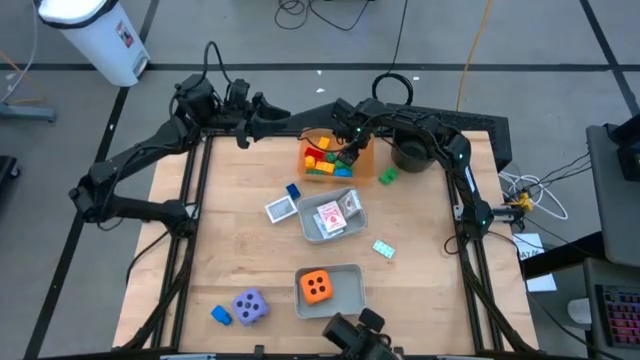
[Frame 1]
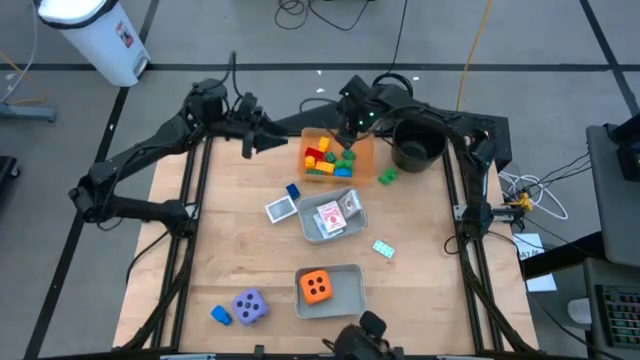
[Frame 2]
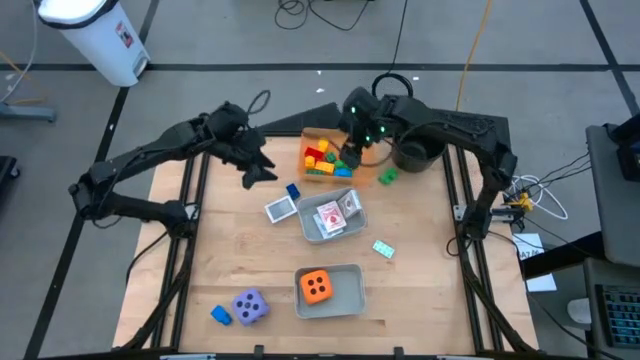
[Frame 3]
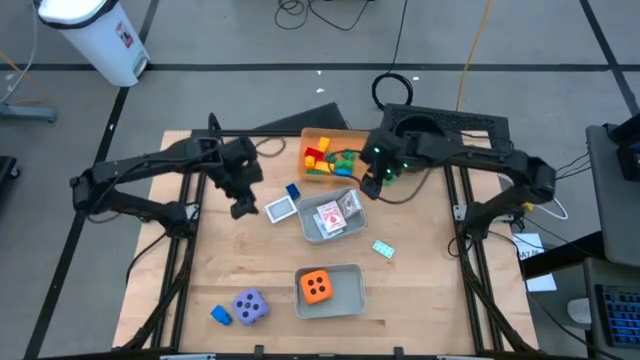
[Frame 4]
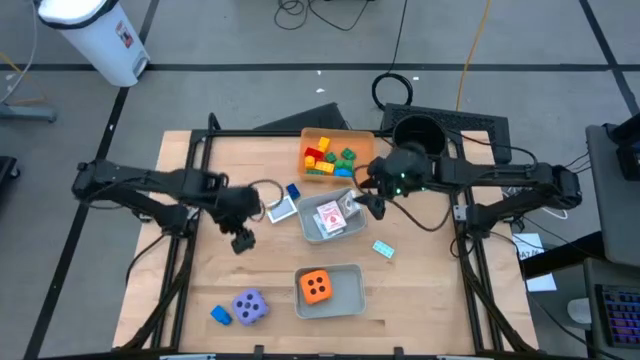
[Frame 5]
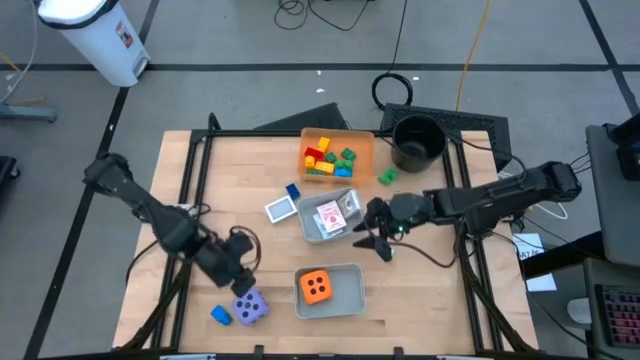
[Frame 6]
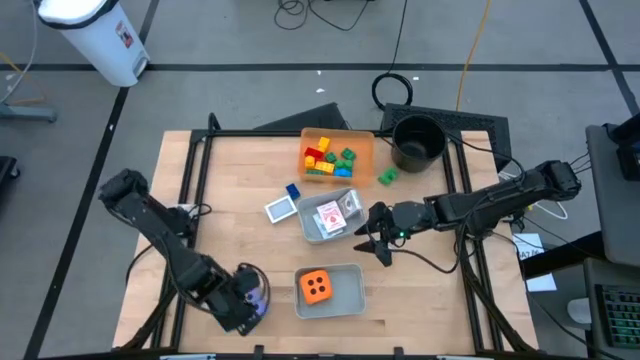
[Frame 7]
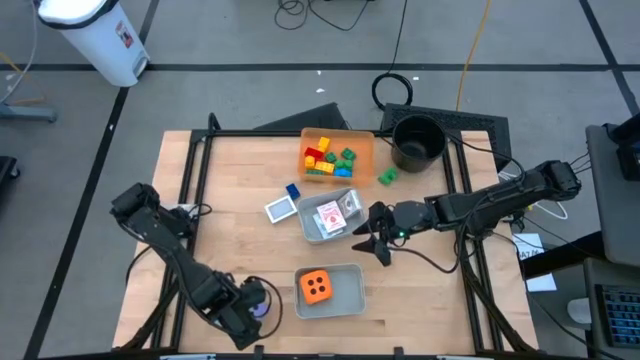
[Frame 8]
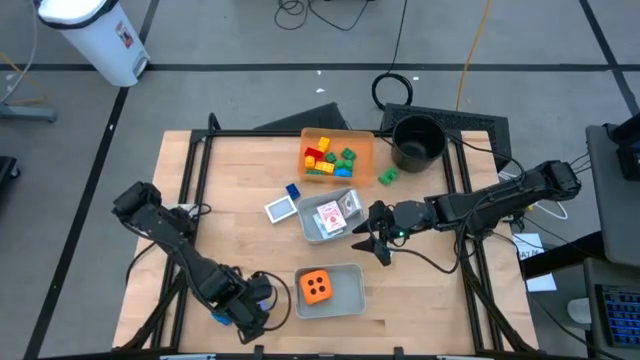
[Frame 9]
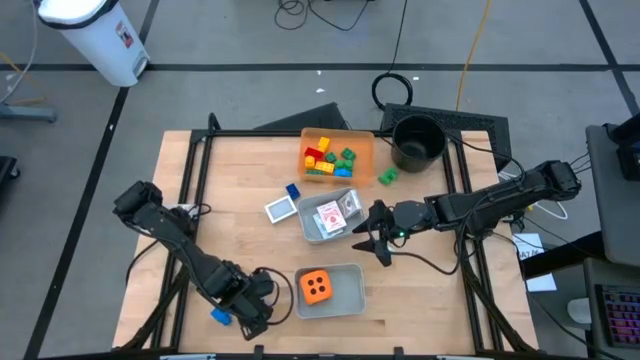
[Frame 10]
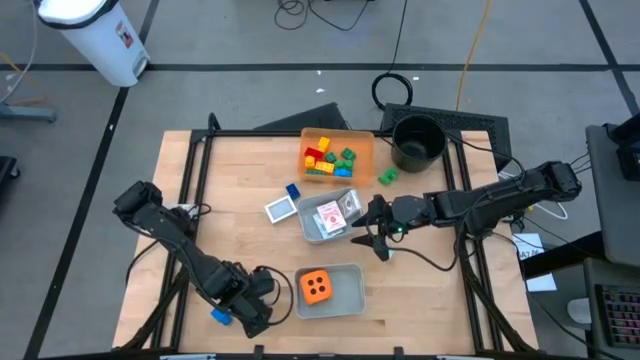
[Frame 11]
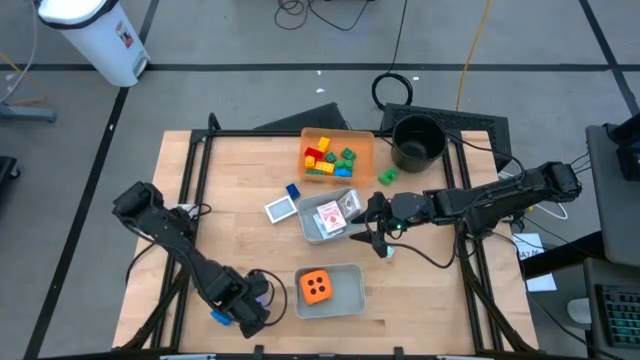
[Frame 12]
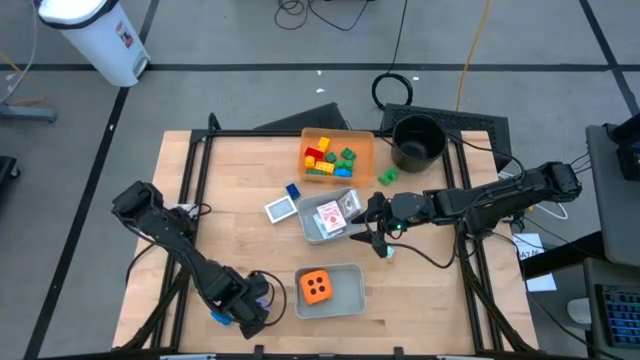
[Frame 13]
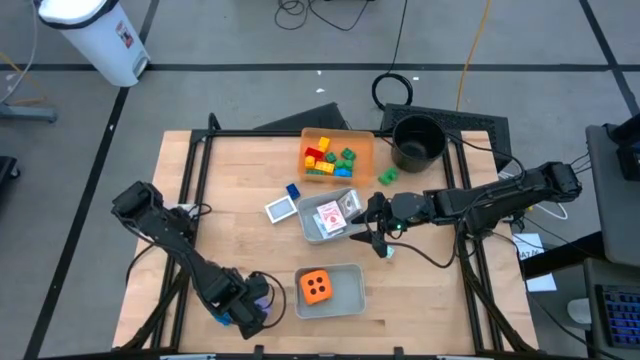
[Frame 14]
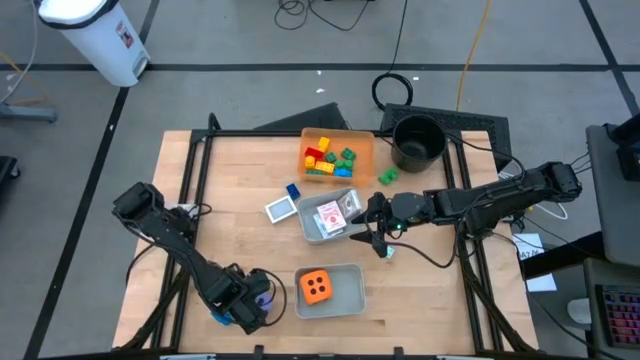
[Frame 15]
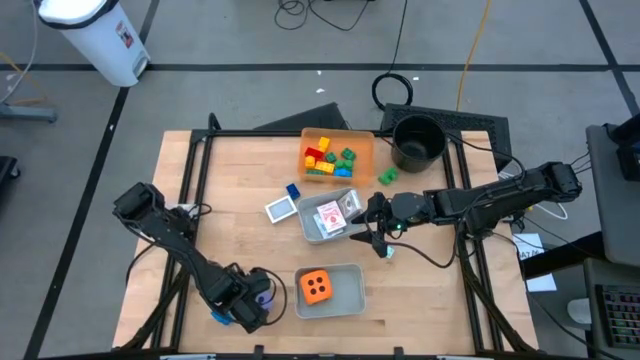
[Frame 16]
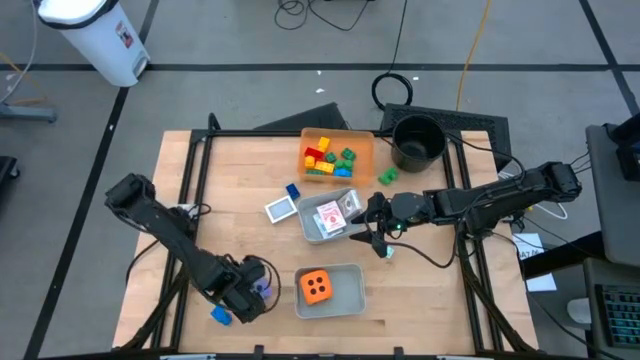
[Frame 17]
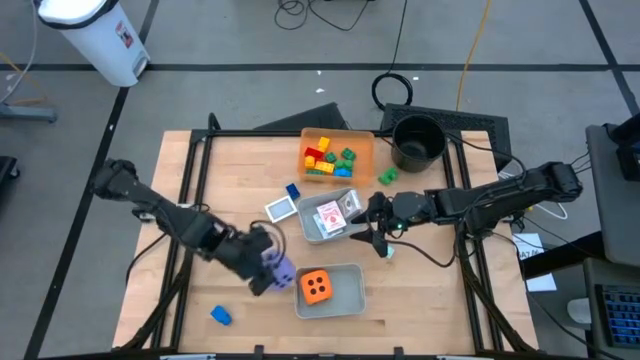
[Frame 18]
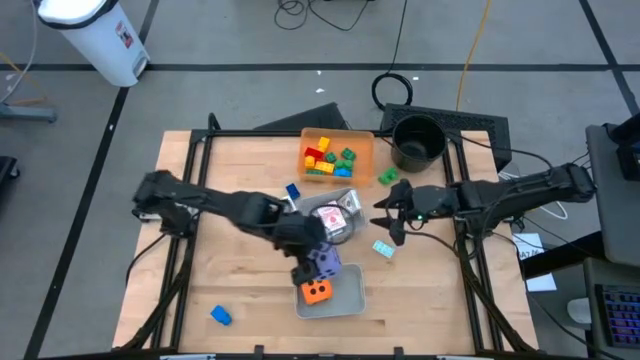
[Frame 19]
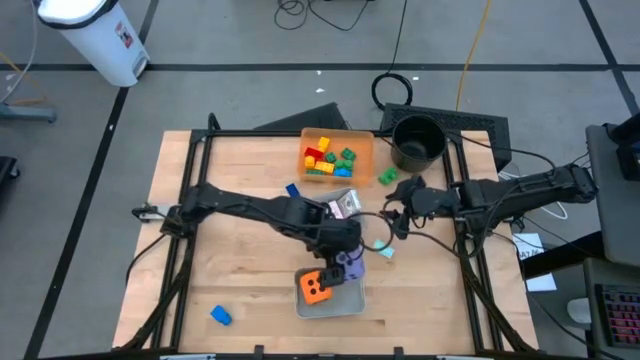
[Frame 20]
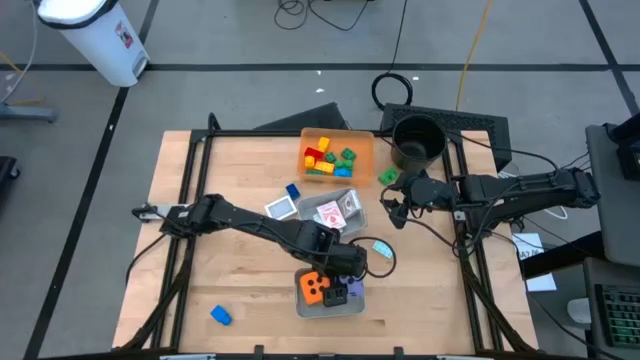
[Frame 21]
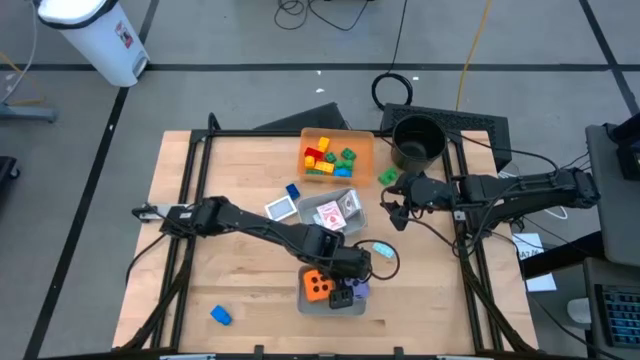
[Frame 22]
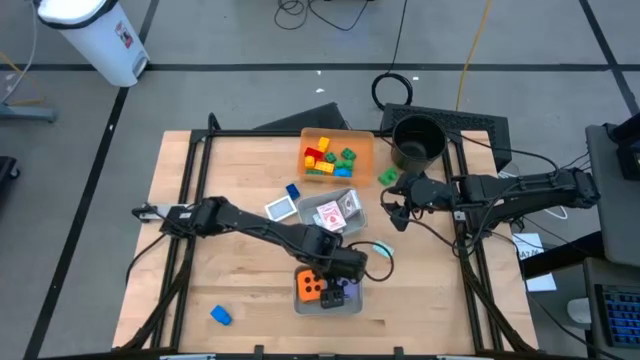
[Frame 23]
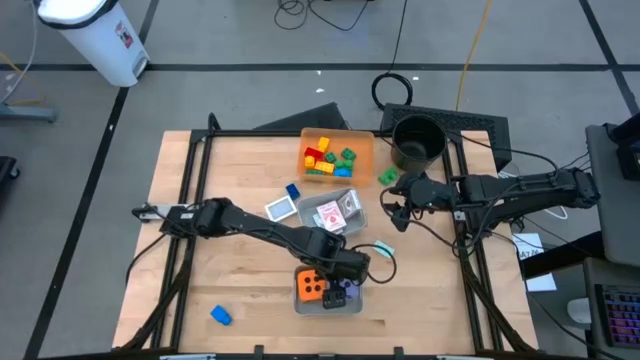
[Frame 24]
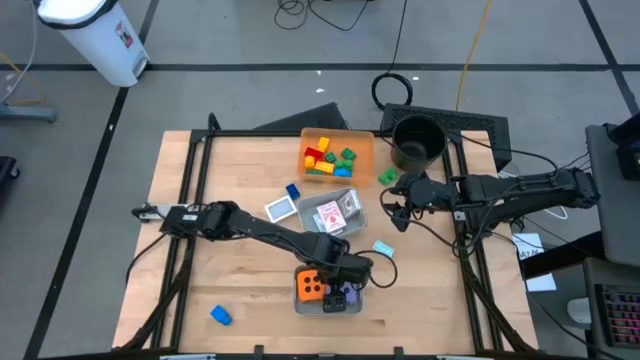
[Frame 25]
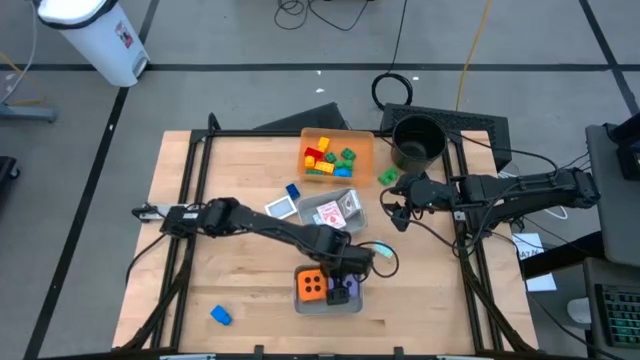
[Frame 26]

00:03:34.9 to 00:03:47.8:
Task: Pick & Place Toys
Put the purple dice into the bottom gray bin

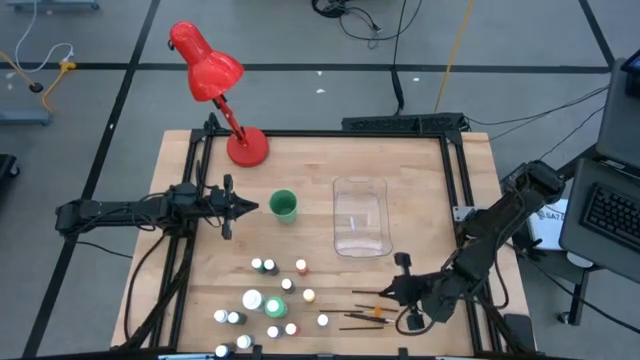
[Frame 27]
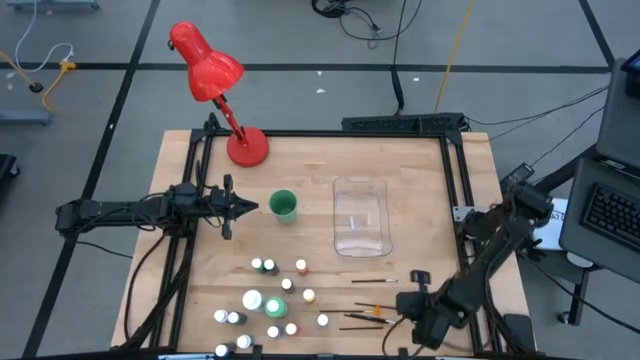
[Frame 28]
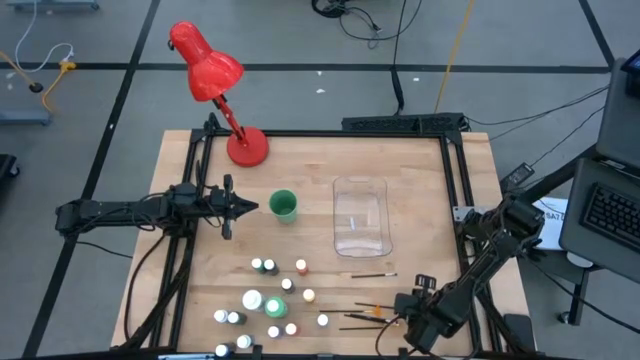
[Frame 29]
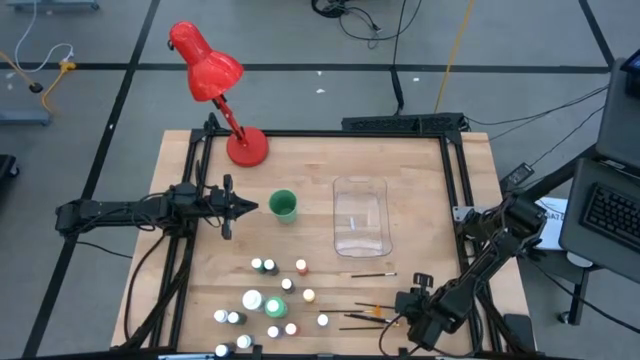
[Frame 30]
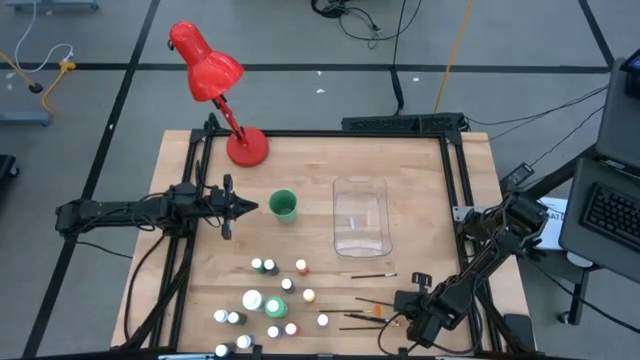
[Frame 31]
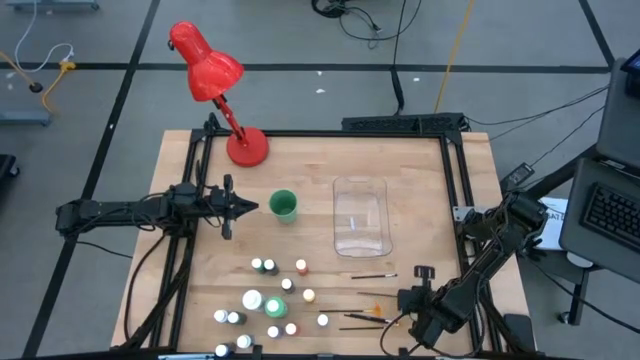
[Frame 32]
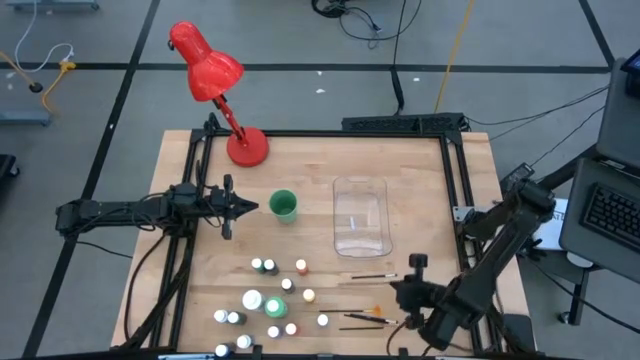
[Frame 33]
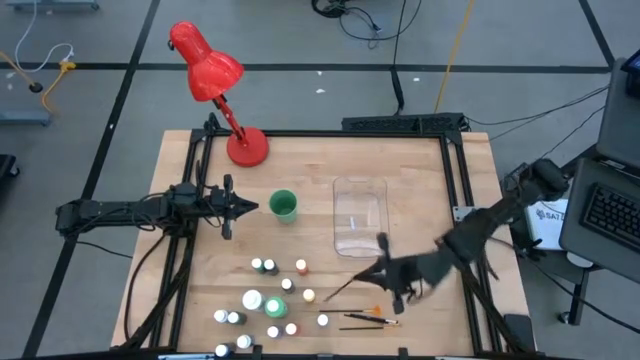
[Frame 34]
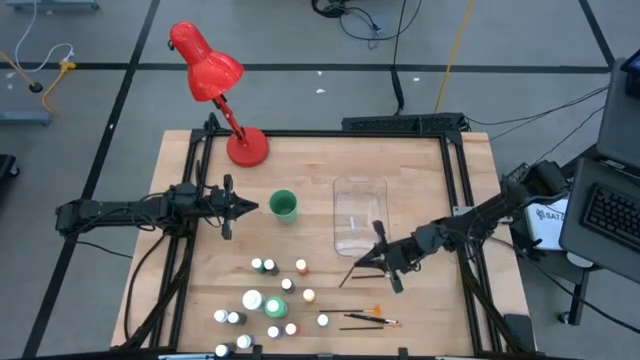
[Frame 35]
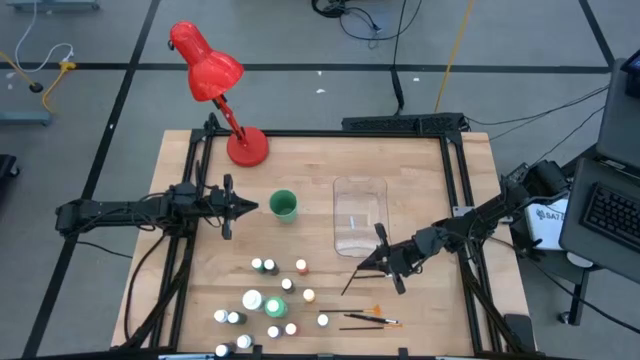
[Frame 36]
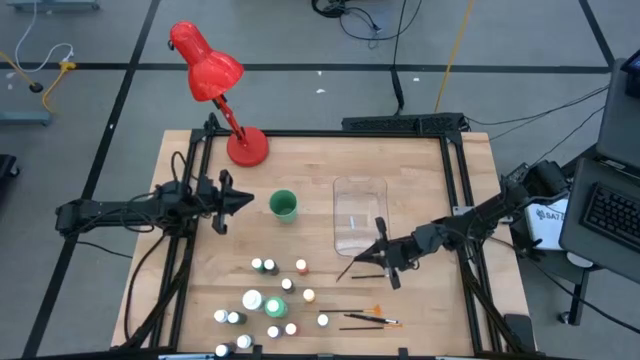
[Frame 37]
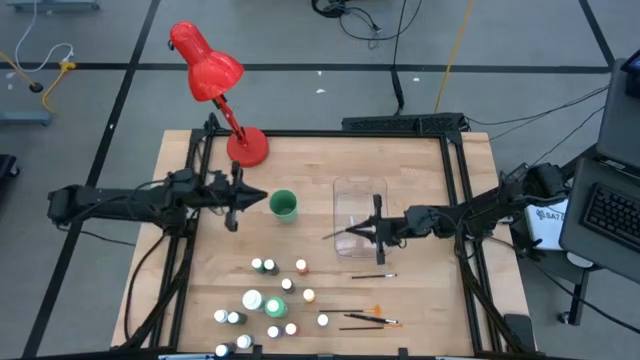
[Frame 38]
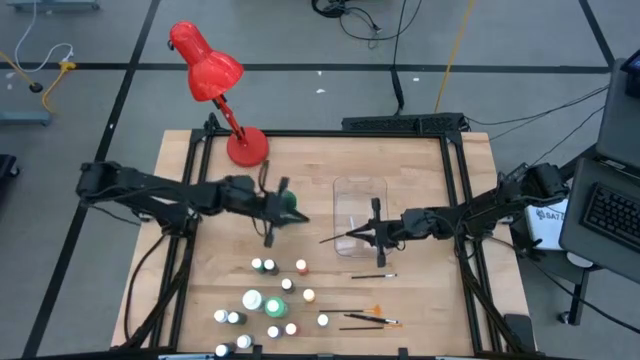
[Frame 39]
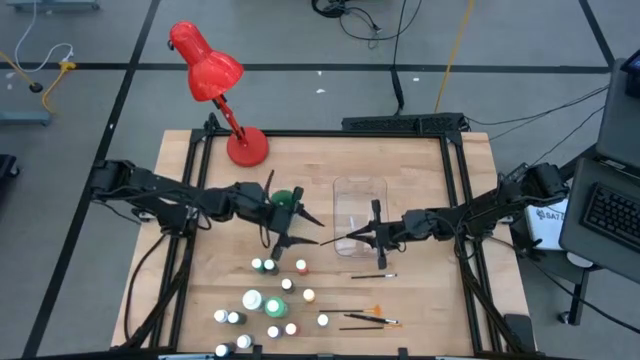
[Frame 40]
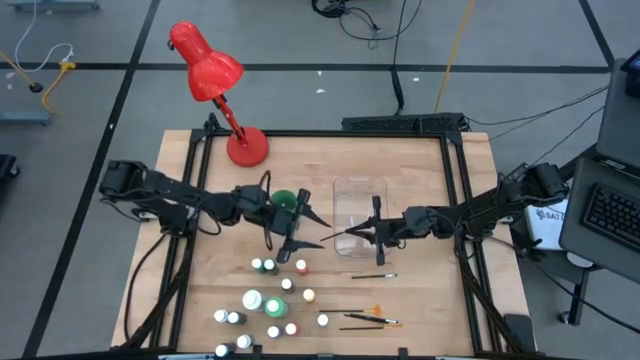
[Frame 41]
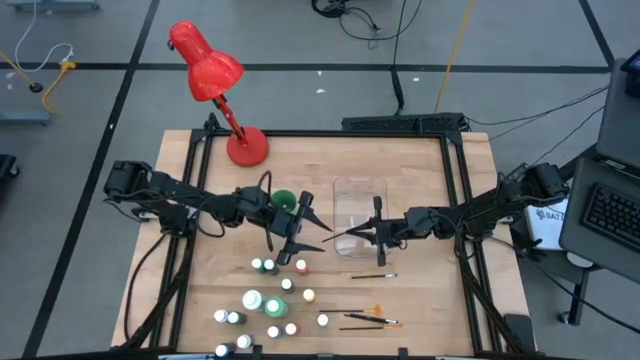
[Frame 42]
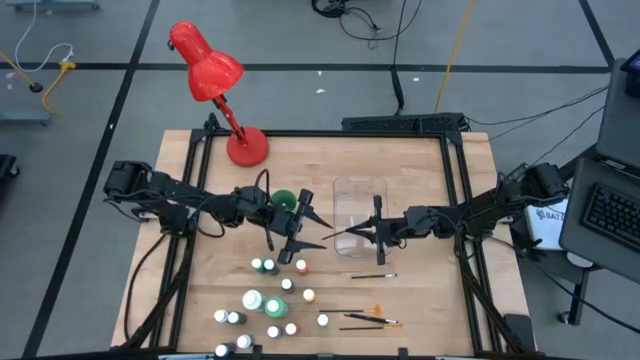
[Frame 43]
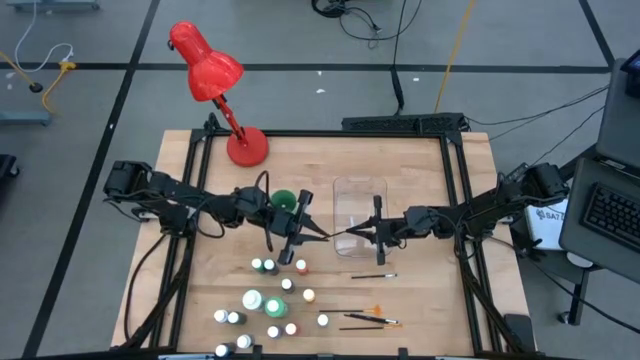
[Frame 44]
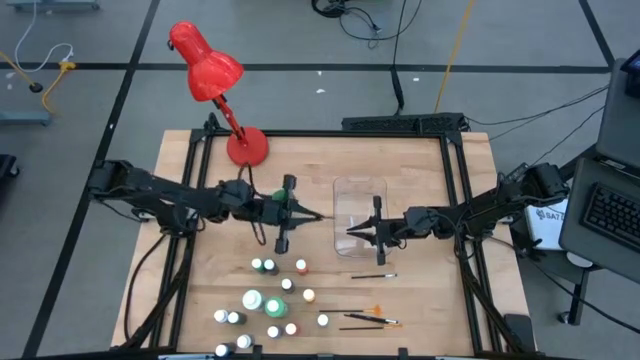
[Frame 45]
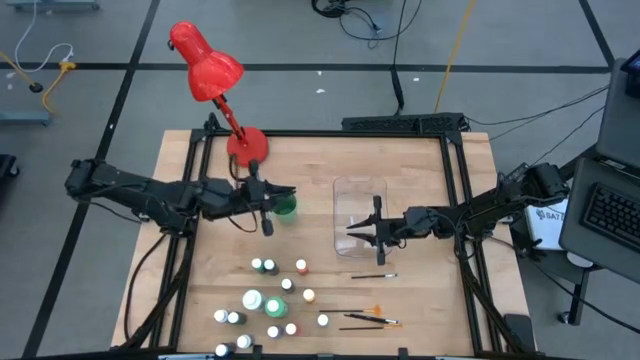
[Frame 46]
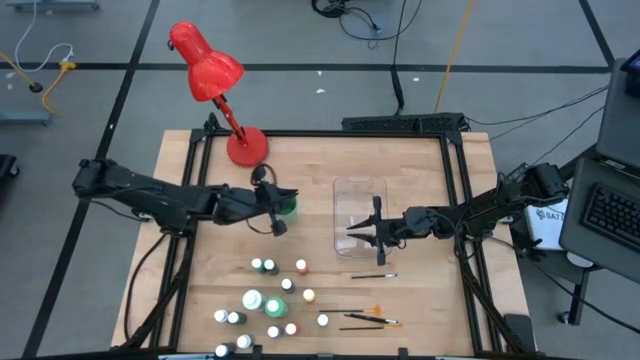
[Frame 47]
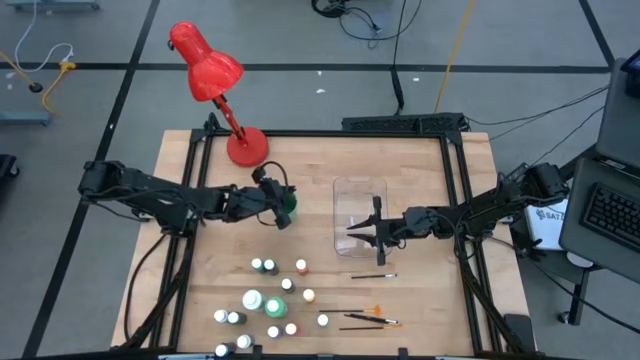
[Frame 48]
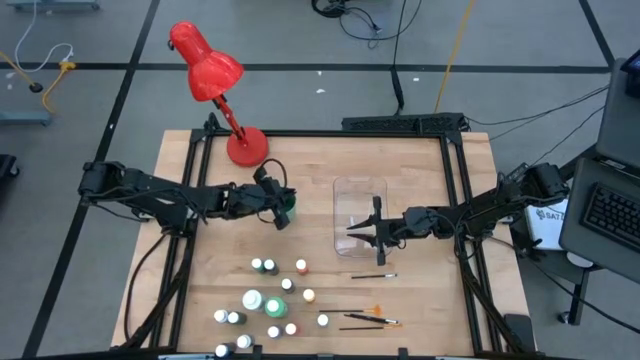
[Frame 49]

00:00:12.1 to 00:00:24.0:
Task: Pick & Place Paint Supplies
Put the gold paintbrush into the green cup
